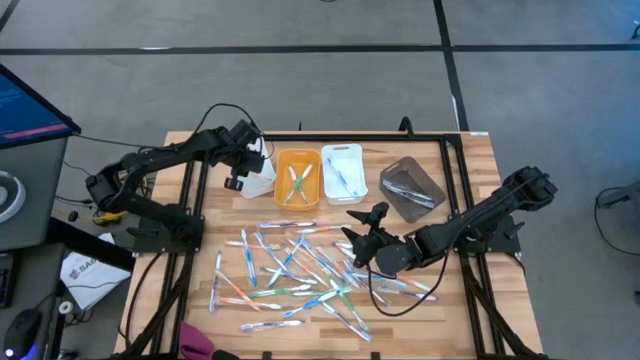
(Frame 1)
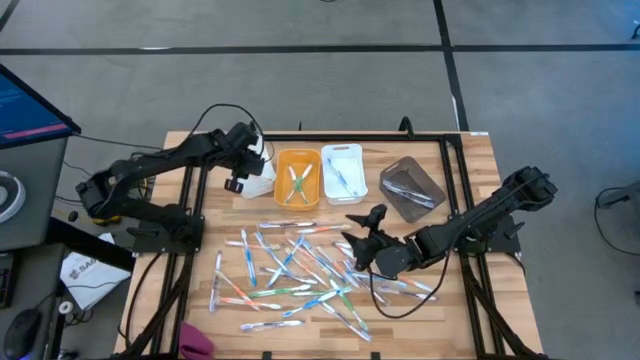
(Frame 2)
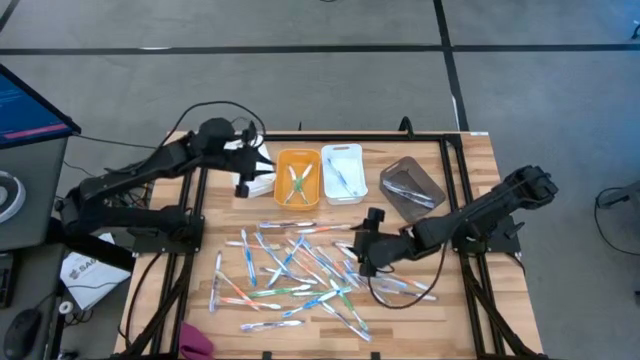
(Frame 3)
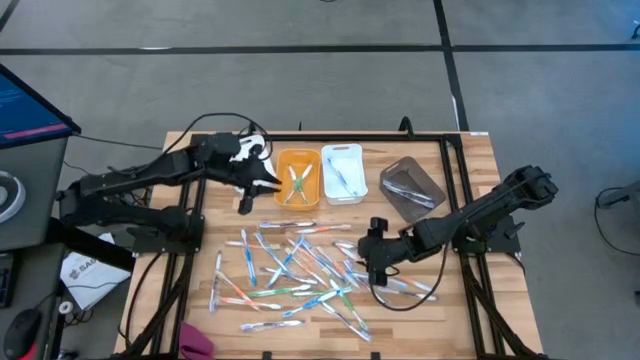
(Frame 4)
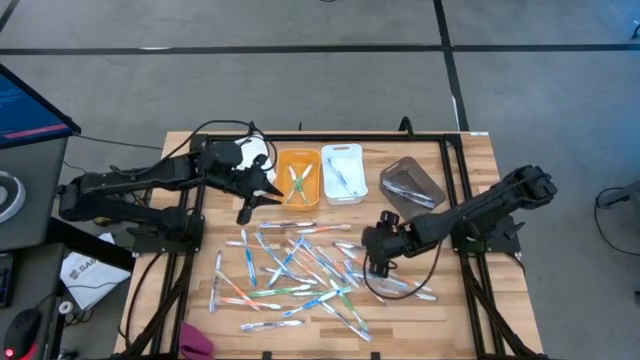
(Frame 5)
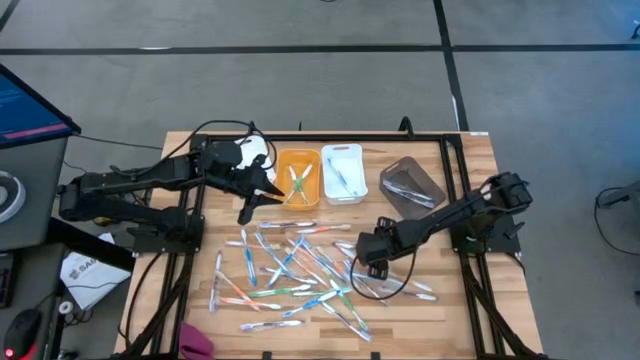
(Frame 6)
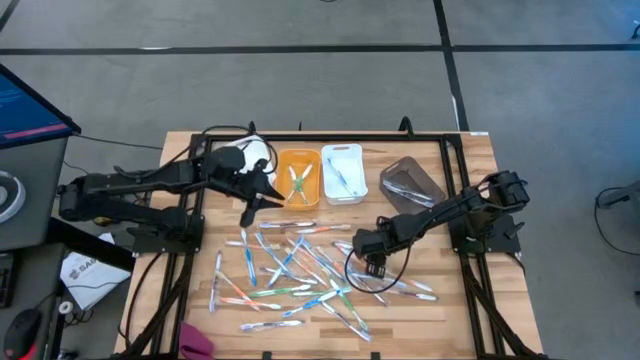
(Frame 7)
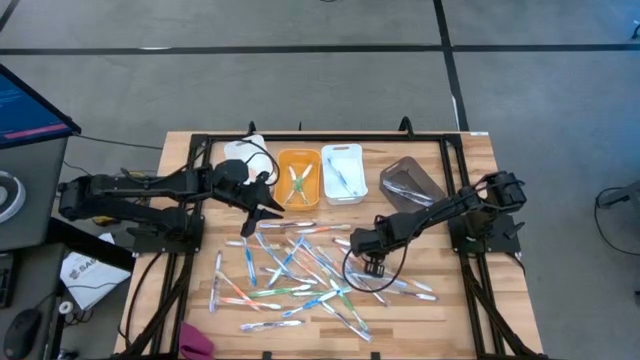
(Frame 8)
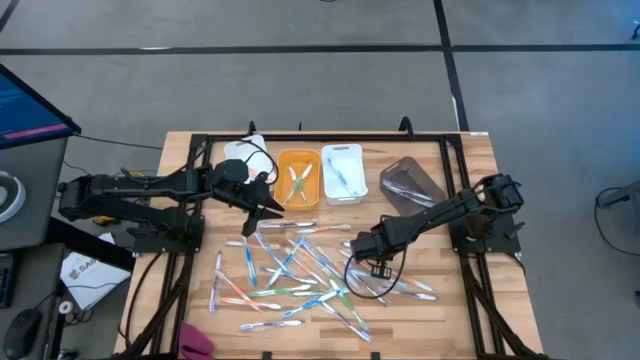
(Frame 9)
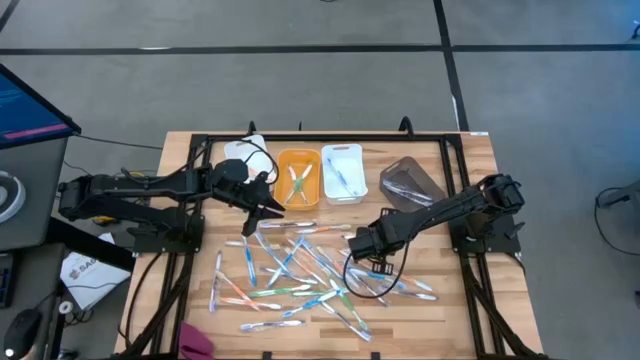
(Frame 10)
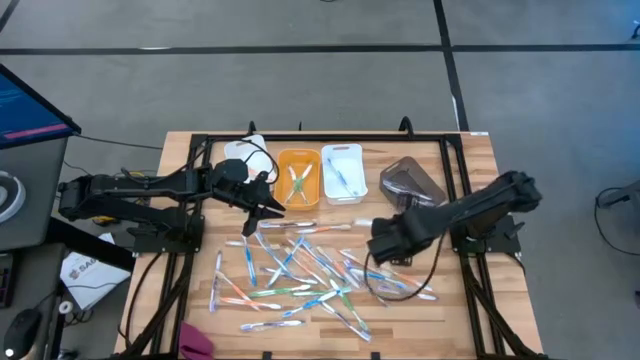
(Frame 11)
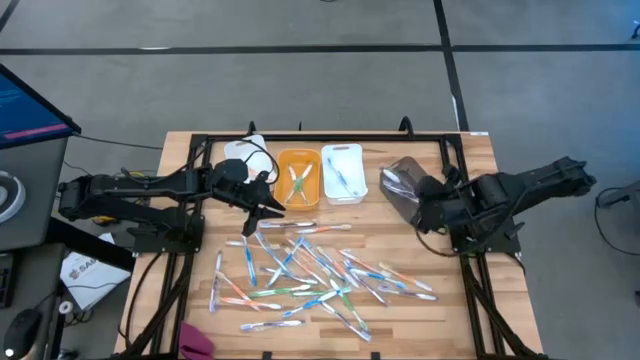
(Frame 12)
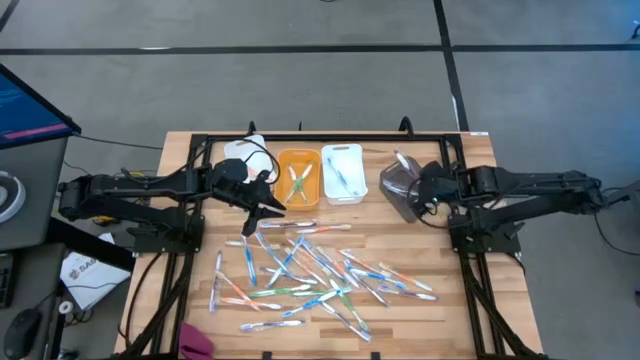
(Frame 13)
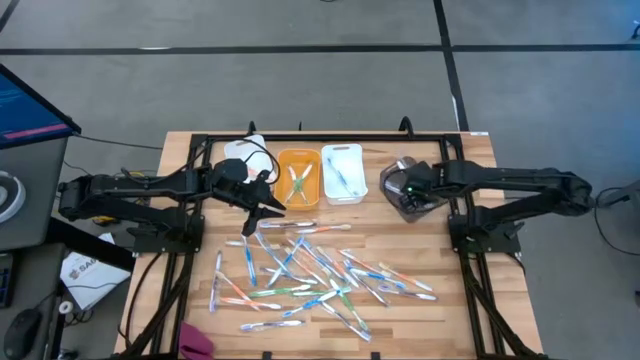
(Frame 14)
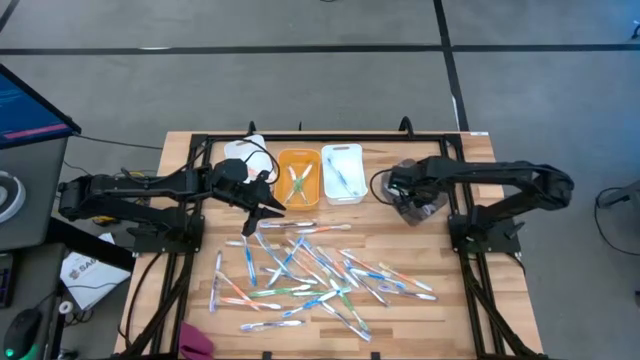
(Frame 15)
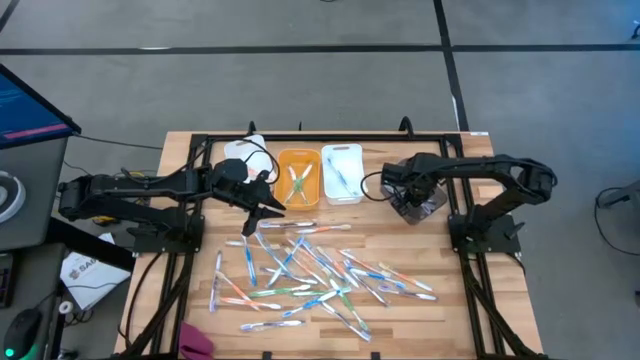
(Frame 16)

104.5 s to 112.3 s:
Task: Pick & Place Toothbrushes
Put the white violet toothbrush into the black transparent bin

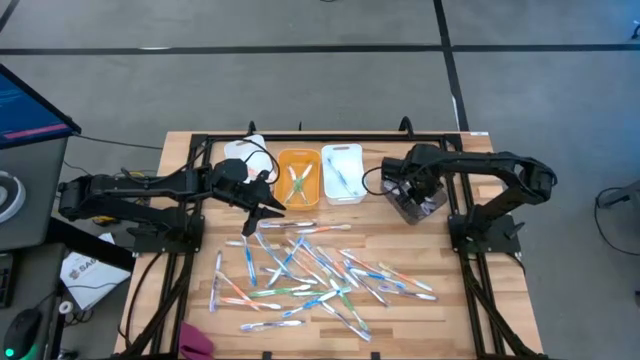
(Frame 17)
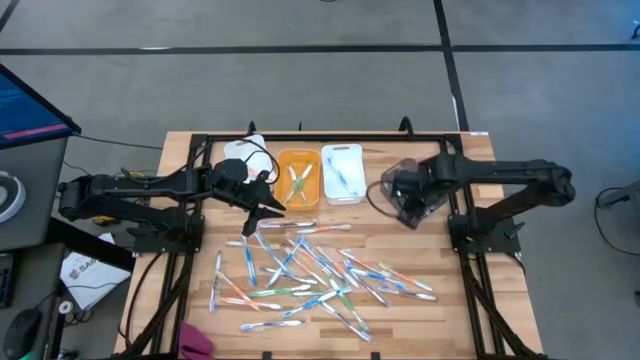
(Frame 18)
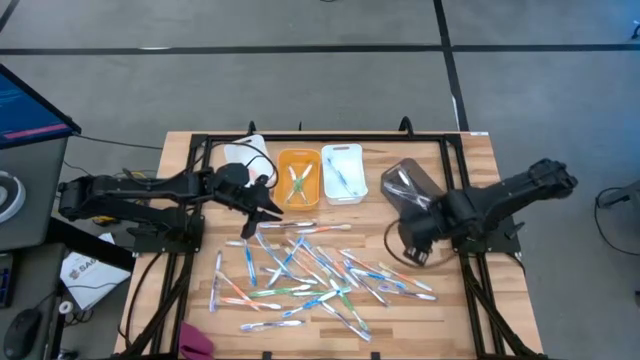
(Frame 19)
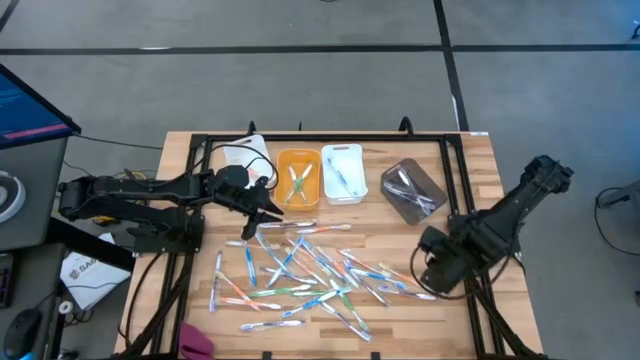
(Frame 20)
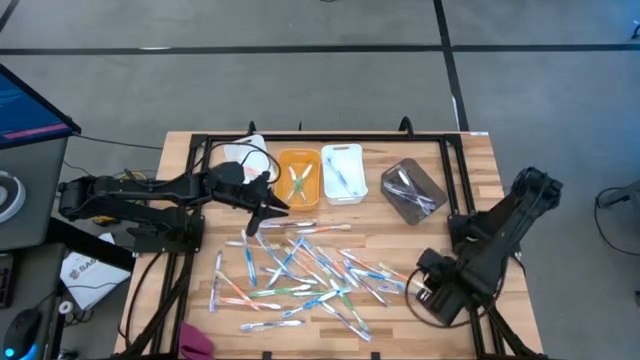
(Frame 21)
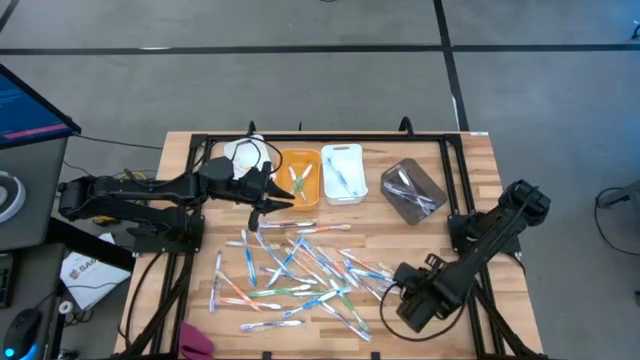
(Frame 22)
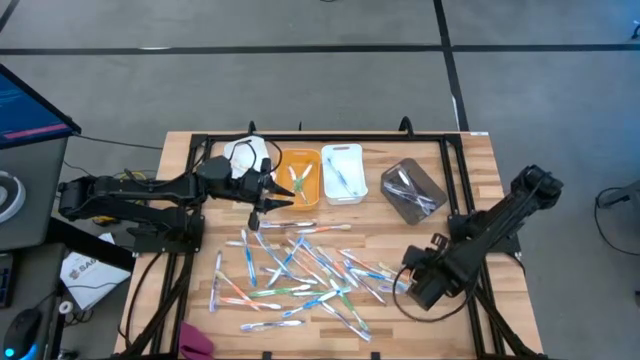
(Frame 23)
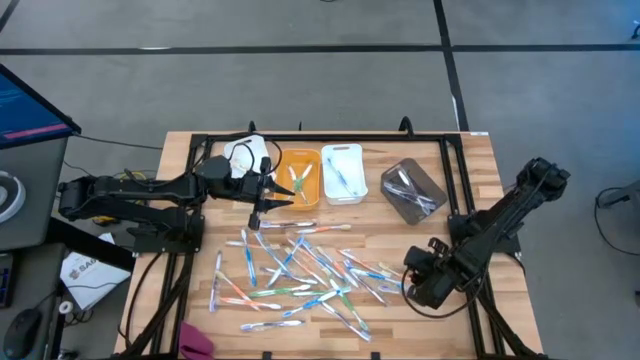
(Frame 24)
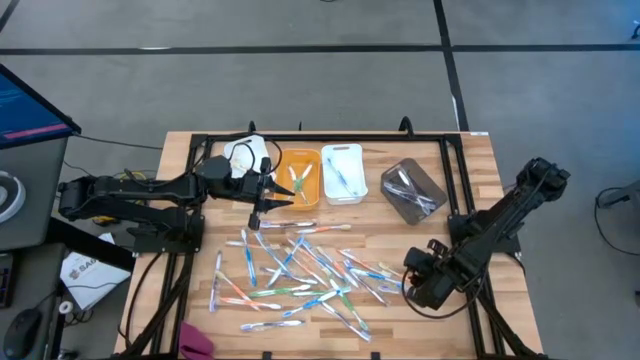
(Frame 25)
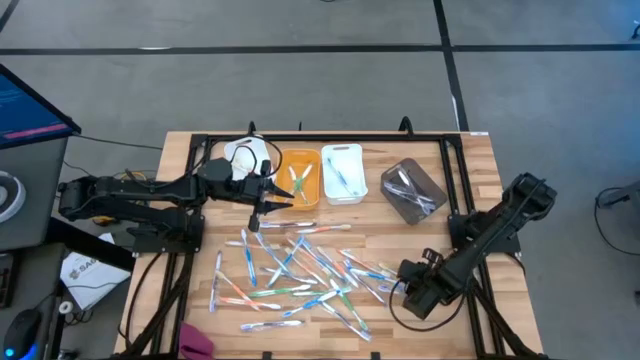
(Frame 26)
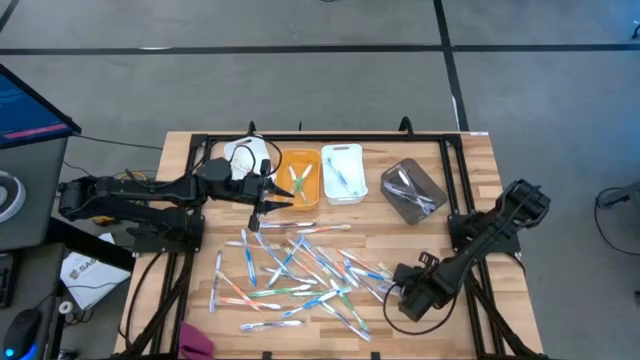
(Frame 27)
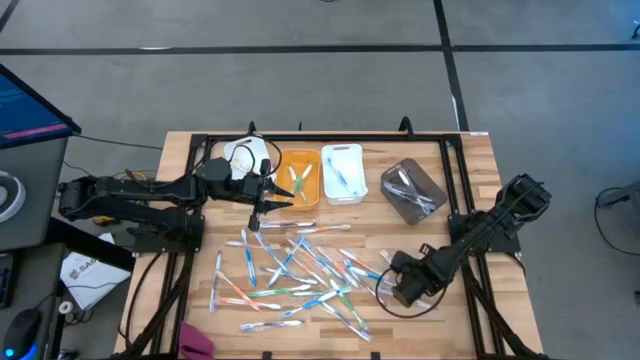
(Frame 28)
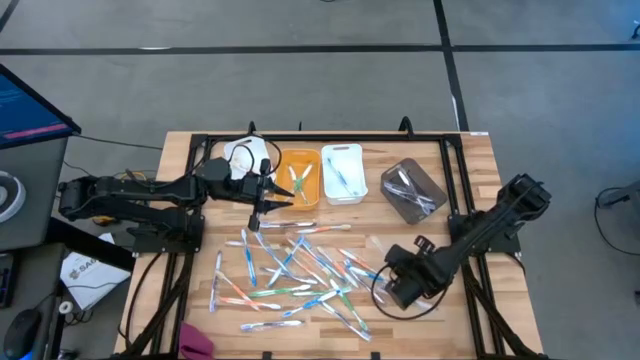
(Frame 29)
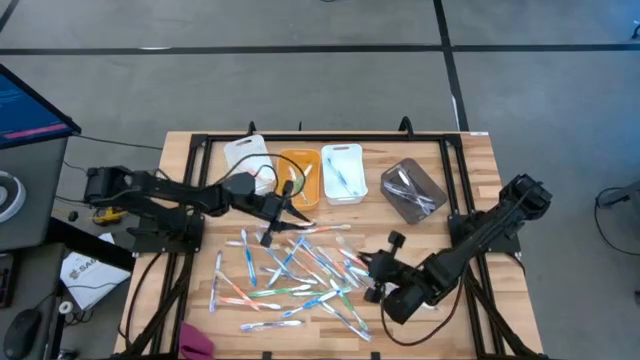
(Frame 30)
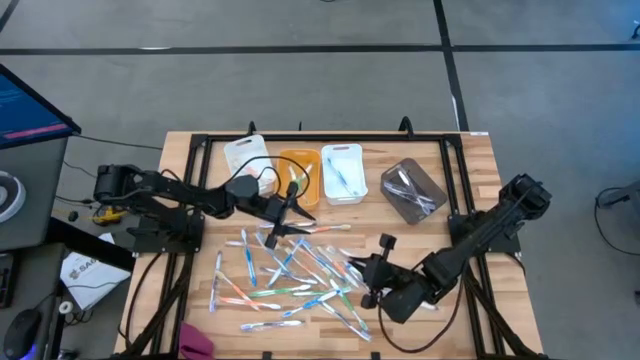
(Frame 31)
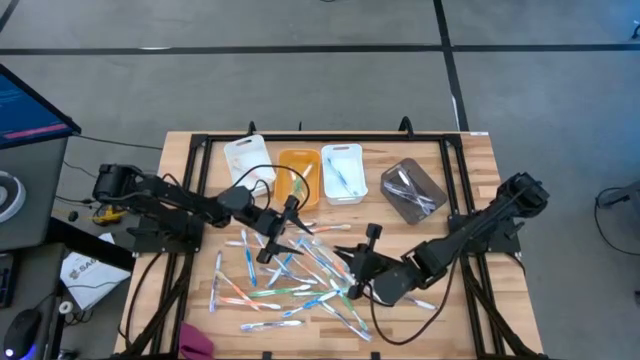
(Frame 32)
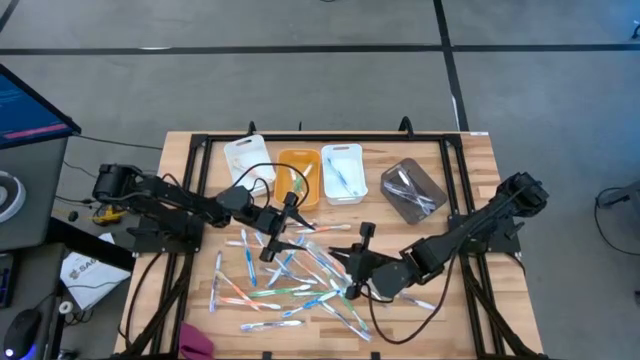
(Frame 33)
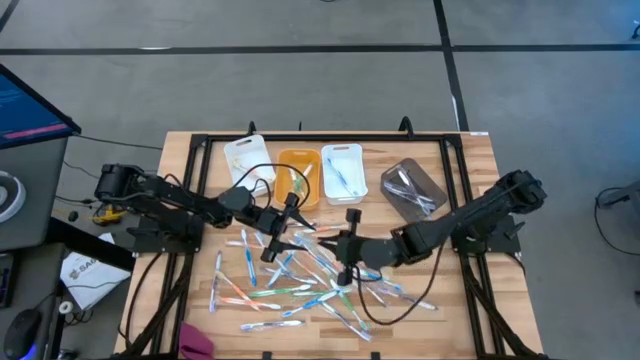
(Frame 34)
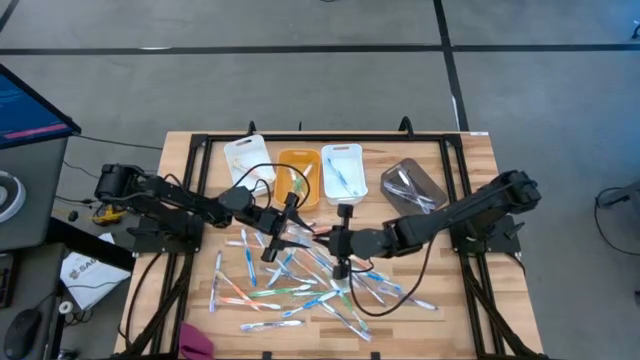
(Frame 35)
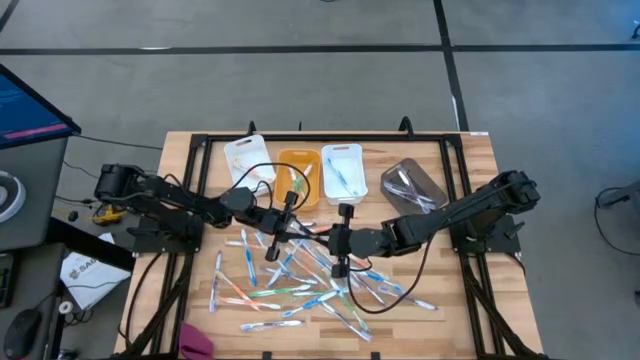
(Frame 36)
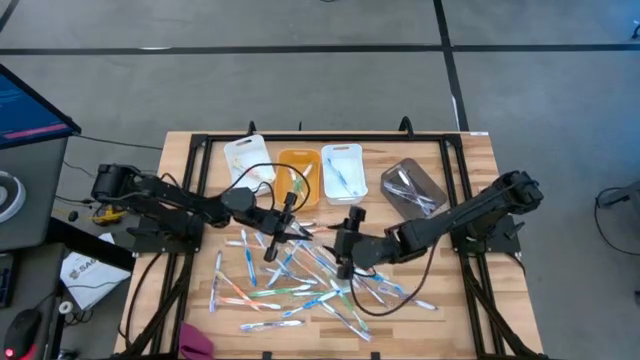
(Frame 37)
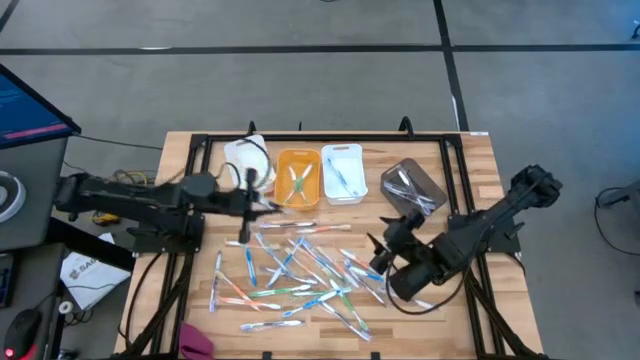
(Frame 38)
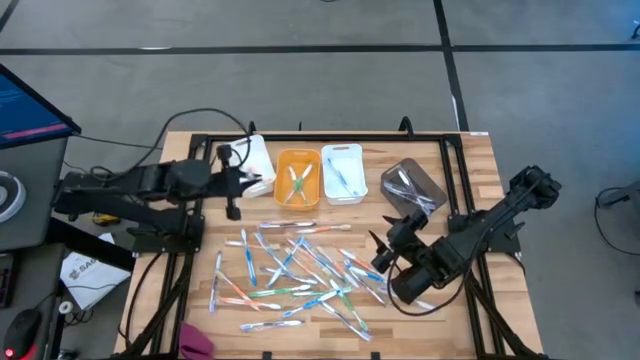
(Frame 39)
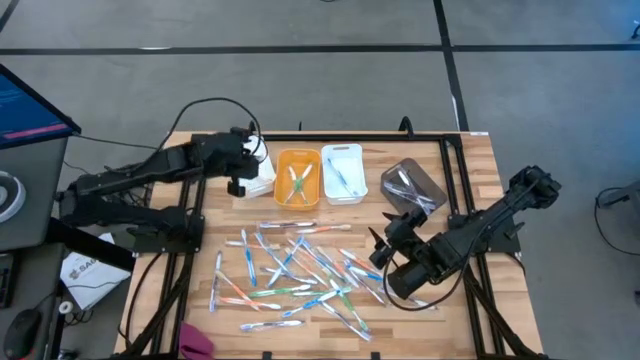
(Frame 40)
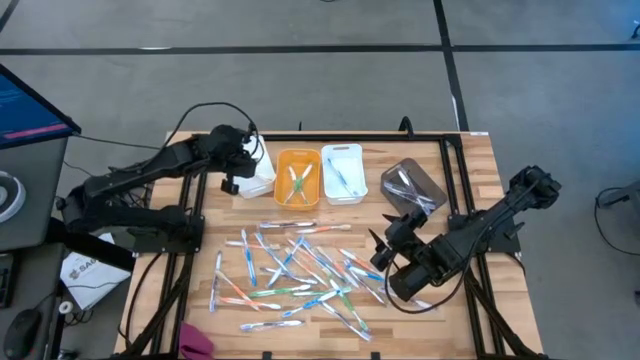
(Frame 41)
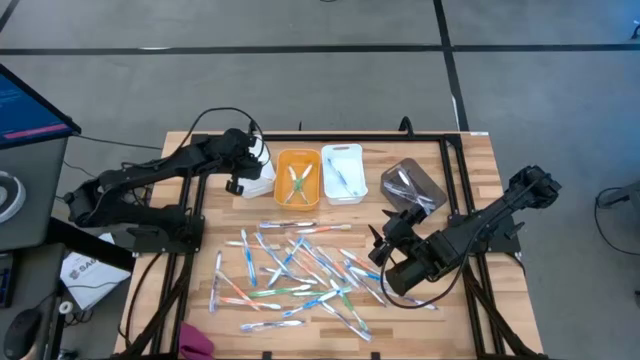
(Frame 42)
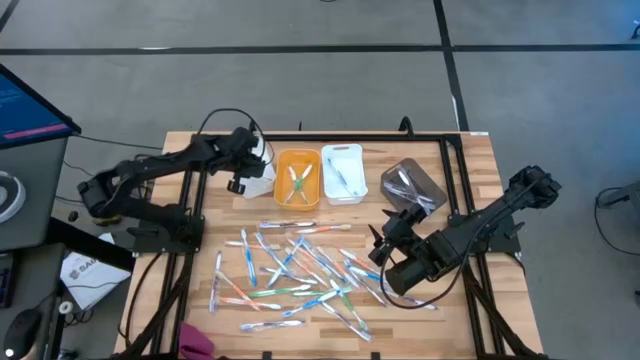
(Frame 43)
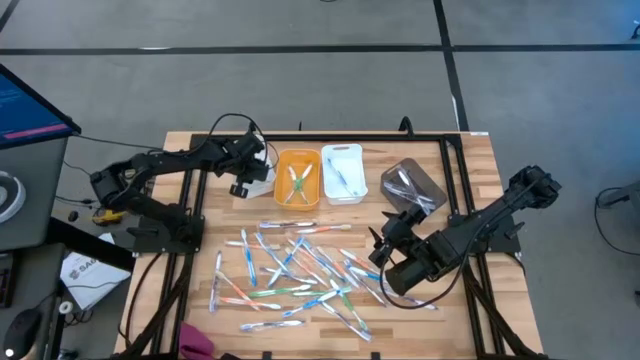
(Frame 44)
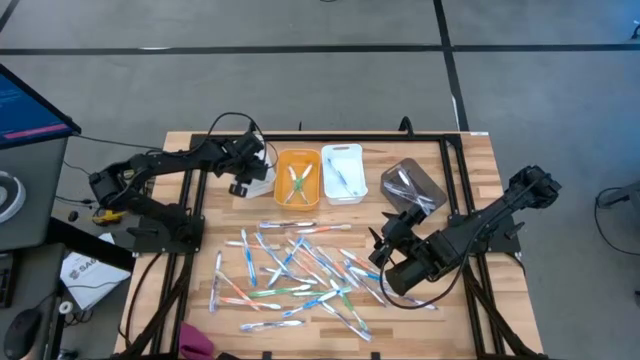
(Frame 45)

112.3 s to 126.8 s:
Put the white orange toothbrush into the left white bin
